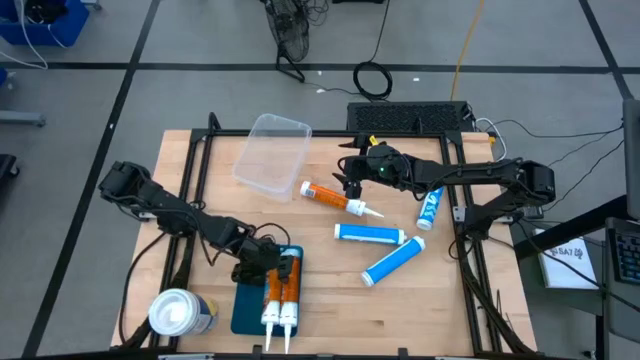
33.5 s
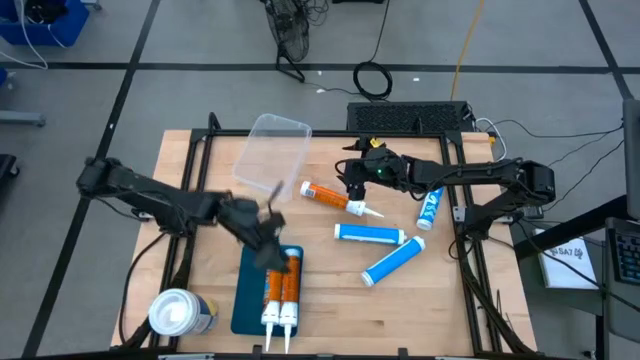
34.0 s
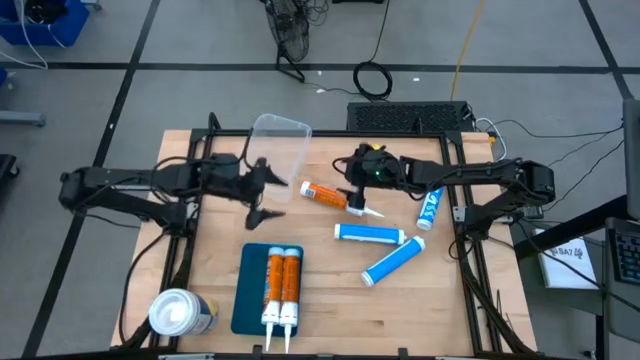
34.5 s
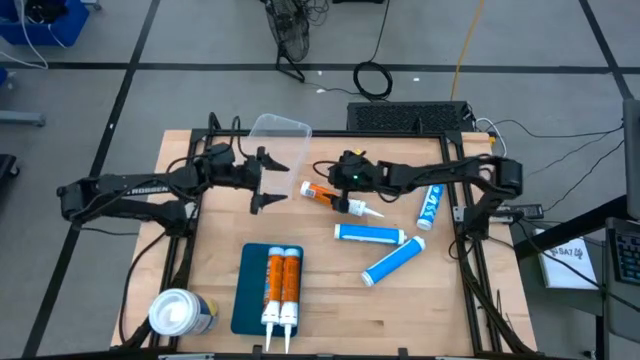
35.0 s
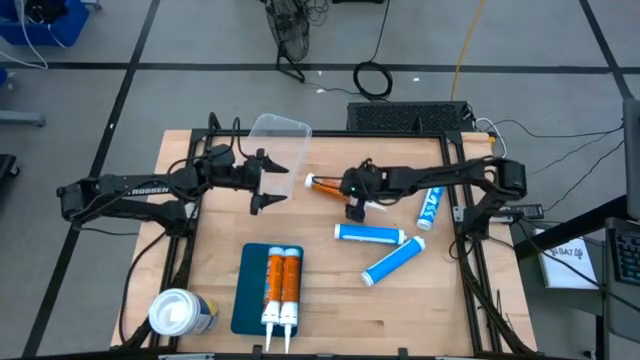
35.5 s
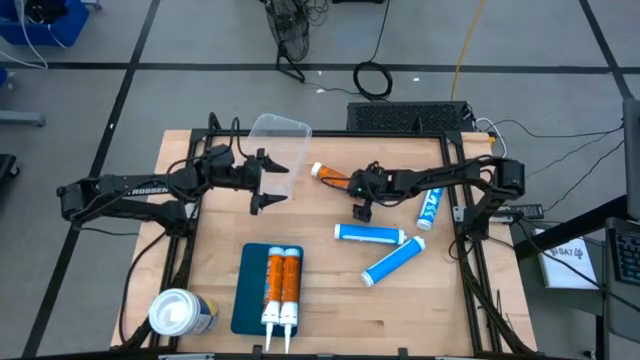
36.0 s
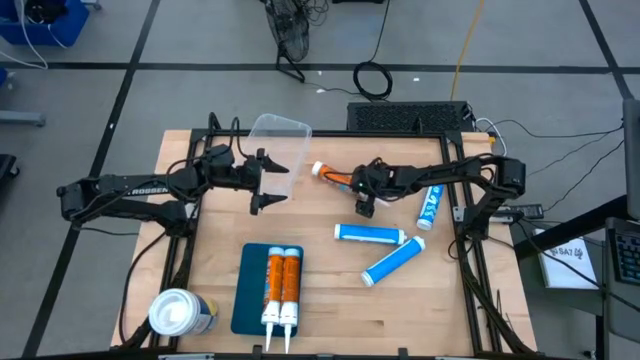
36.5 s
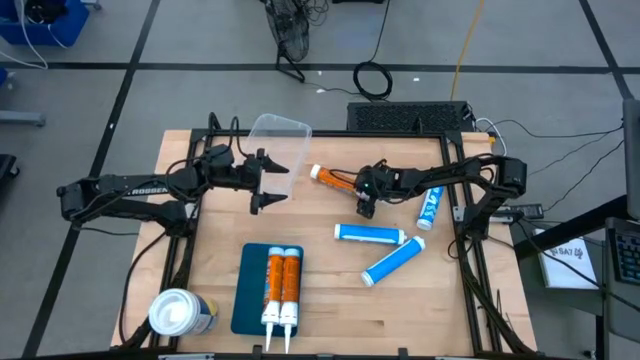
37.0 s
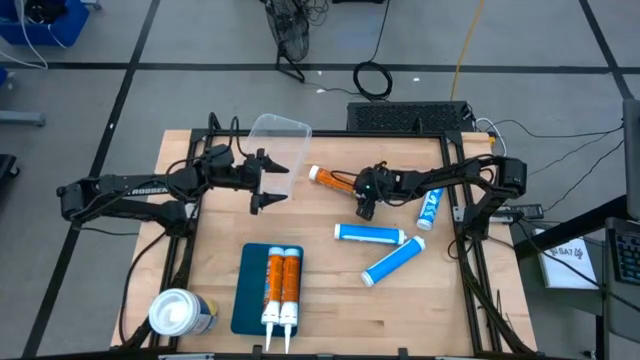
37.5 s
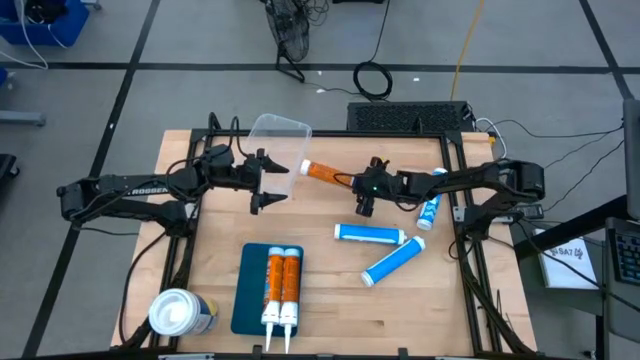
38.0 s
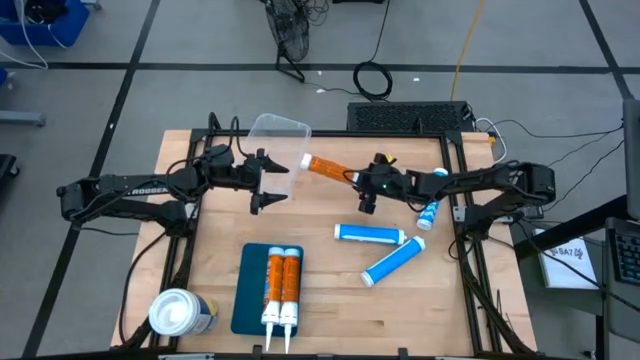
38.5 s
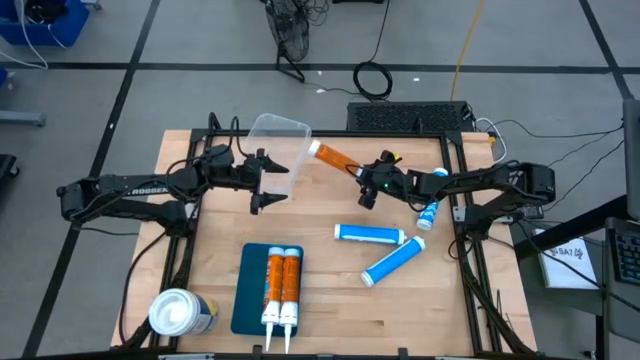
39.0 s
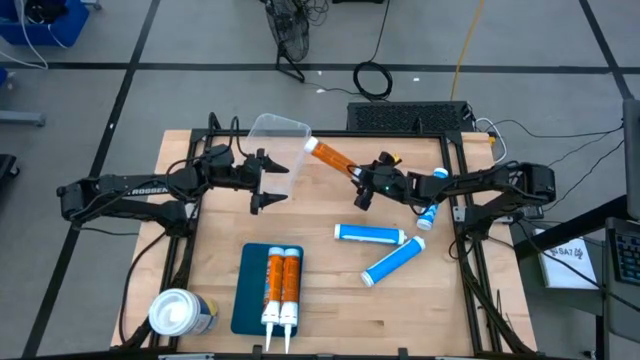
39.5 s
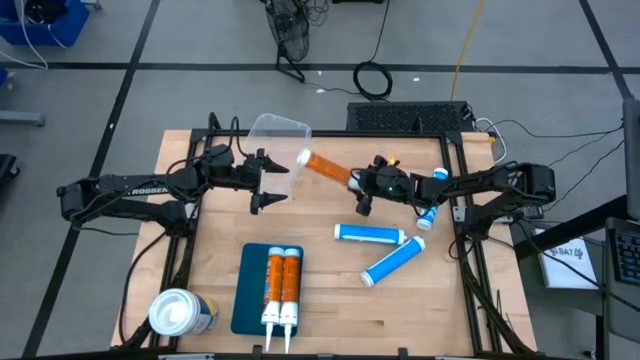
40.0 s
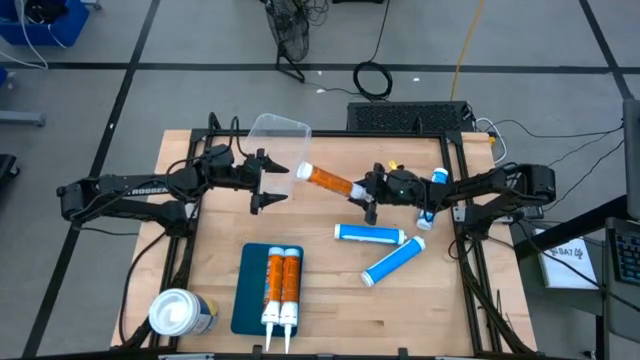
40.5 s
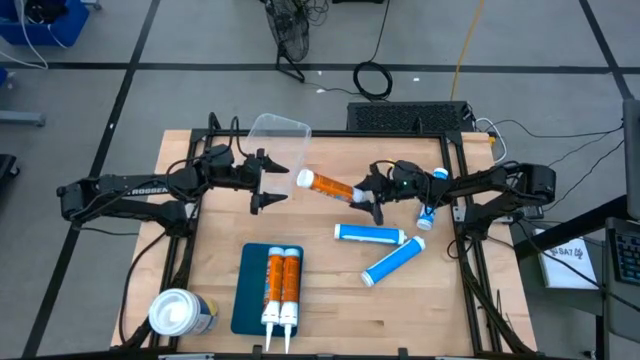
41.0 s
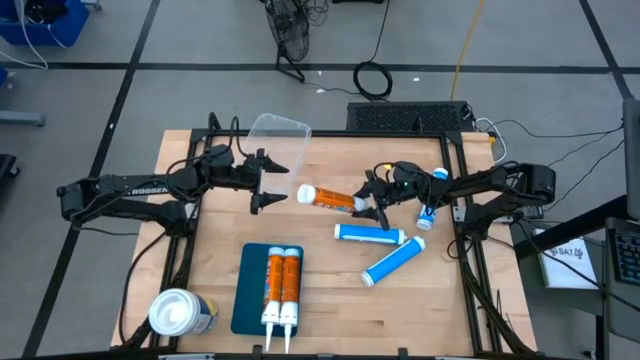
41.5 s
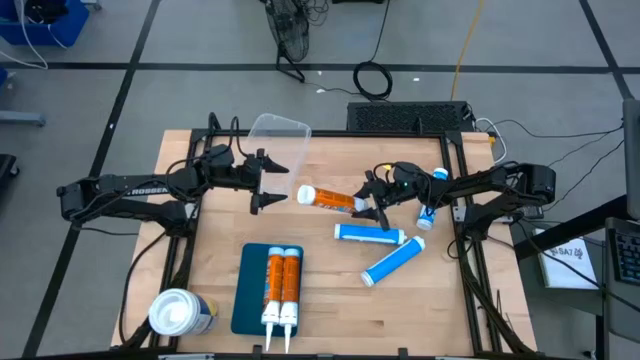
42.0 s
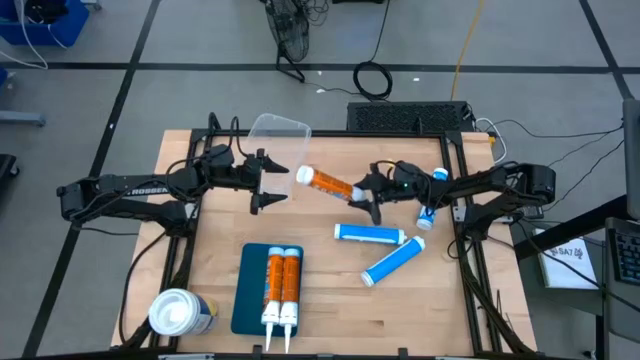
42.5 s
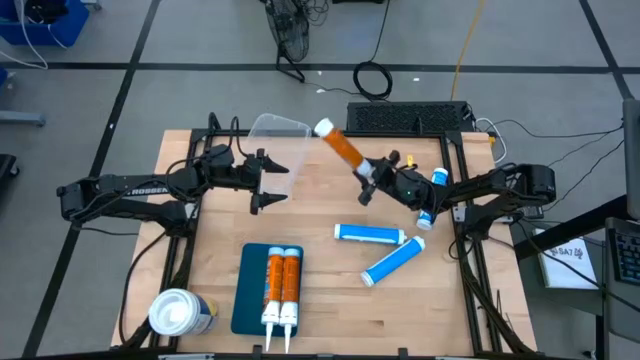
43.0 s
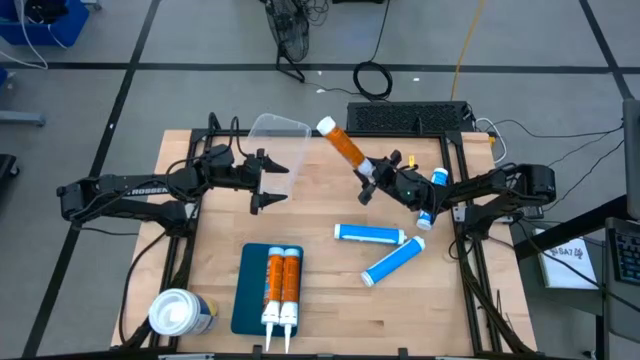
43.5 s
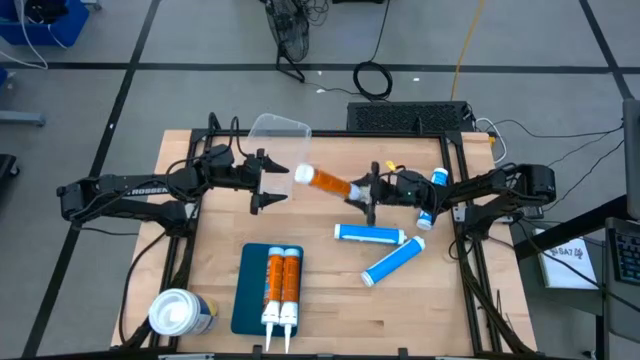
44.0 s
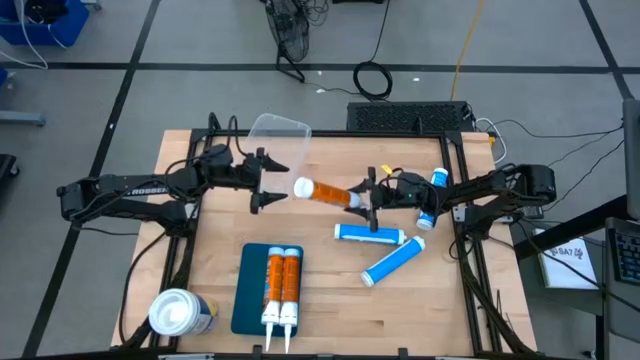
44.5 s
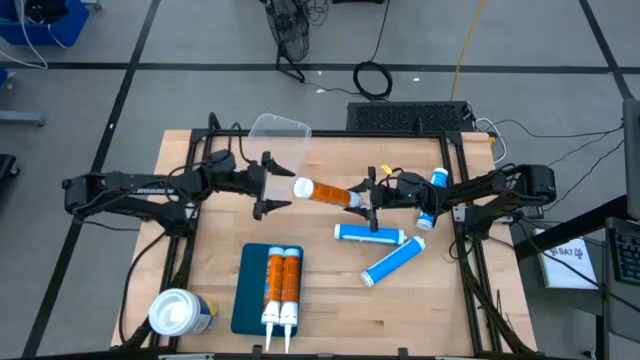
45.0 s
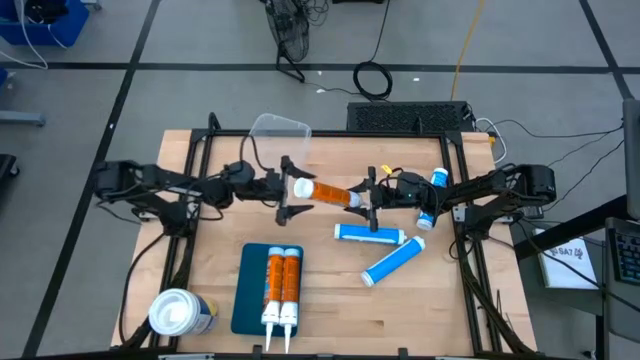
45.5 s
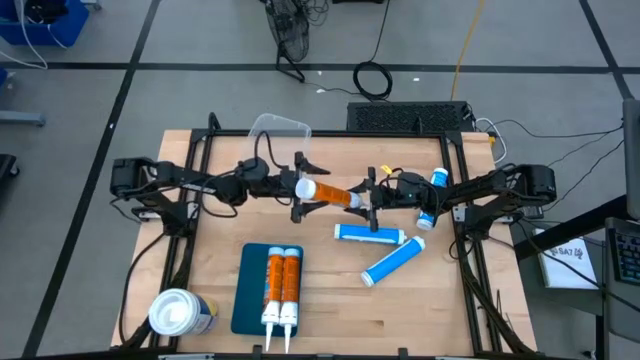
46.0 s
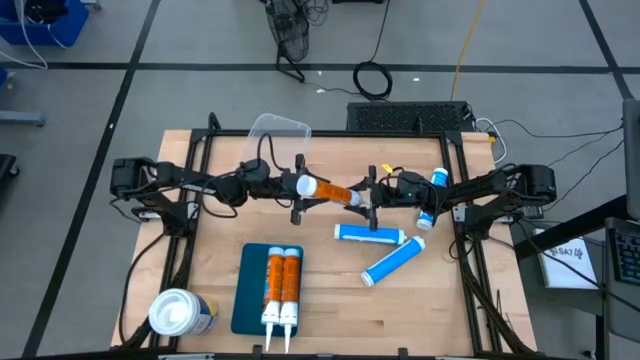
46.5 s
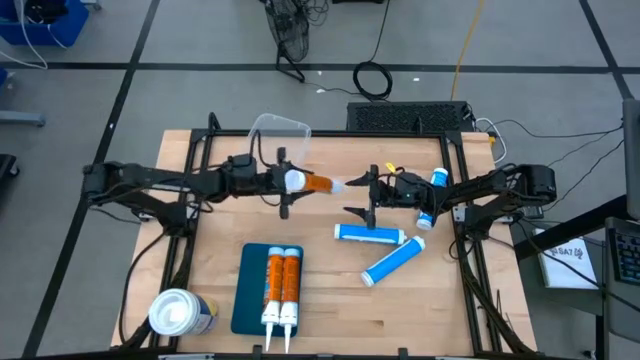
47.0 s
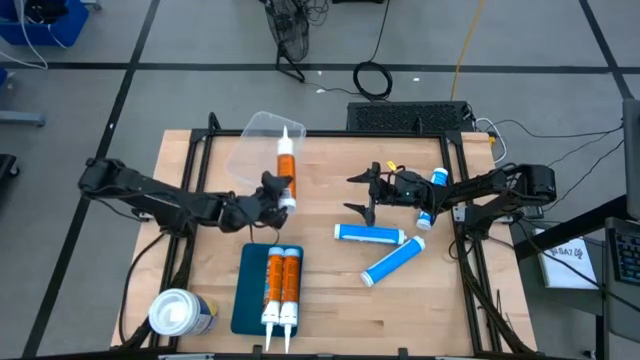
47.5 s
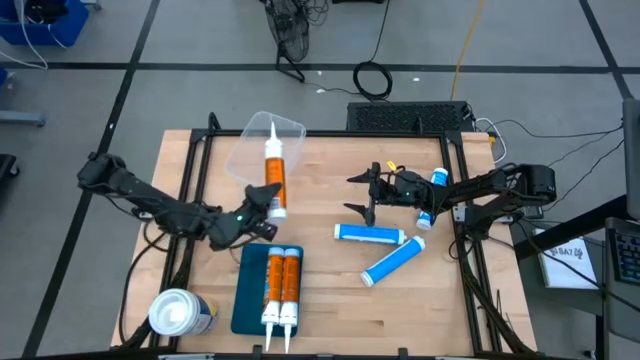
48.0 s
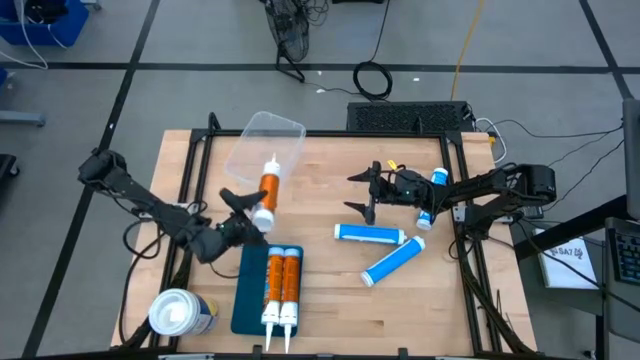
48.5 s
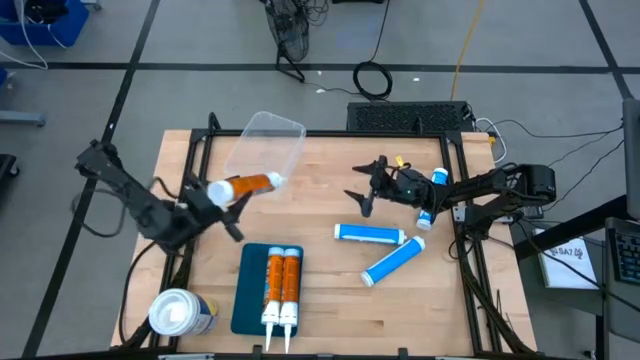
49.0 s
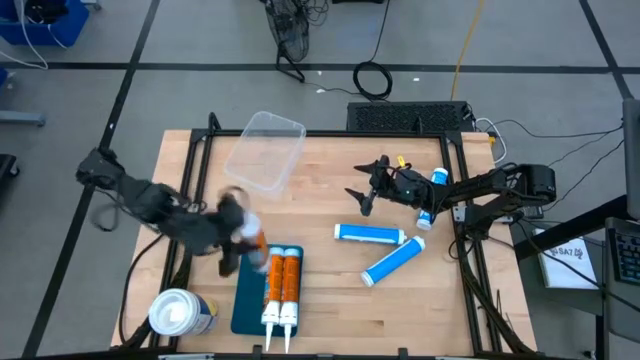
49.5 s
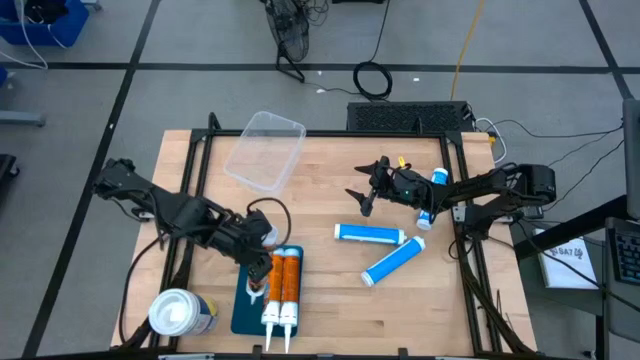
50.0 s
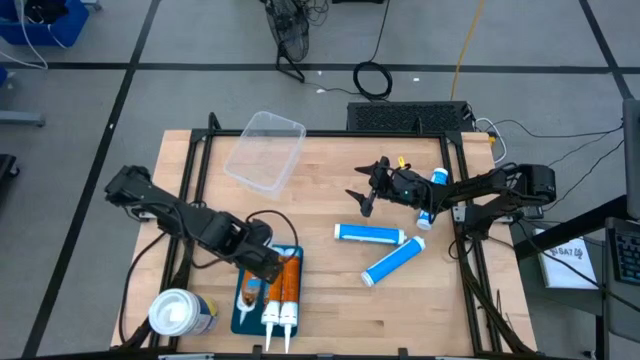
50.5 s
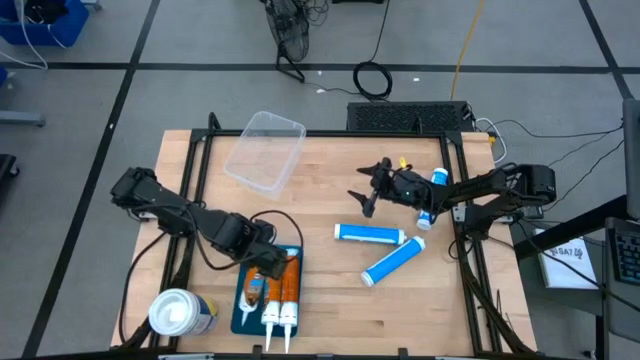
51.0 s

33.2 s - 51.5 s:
Task: Pick & place silicon tubes, Sealant and Lysol wipes
Put the orange sealant into the blue bin

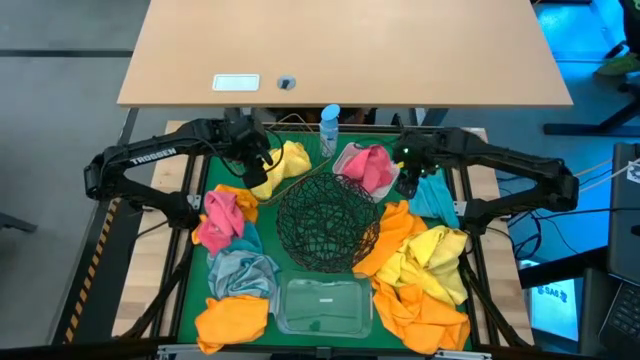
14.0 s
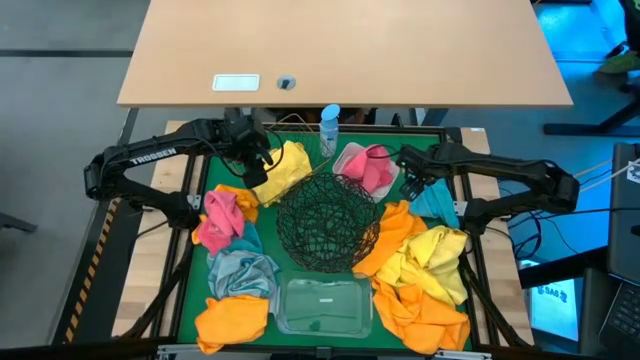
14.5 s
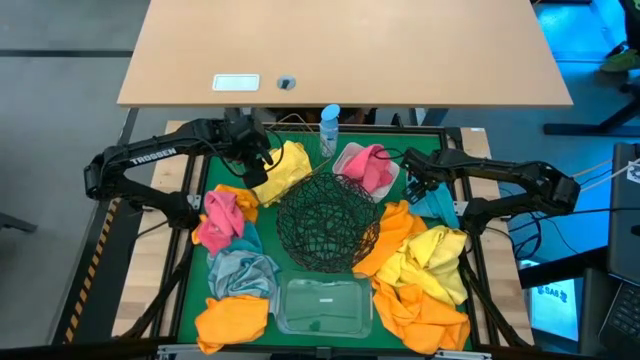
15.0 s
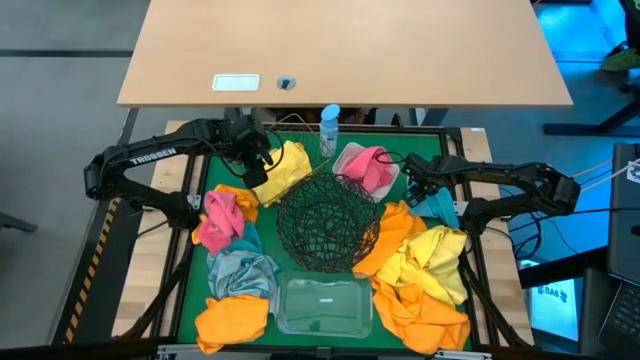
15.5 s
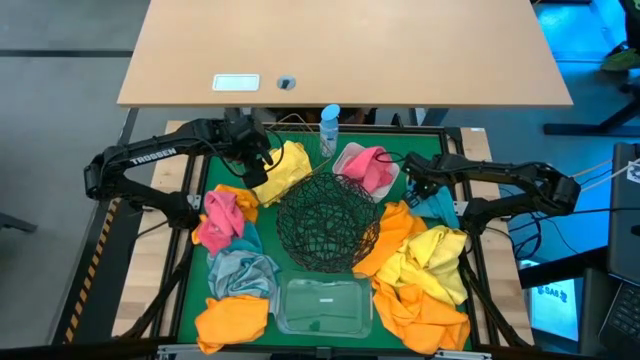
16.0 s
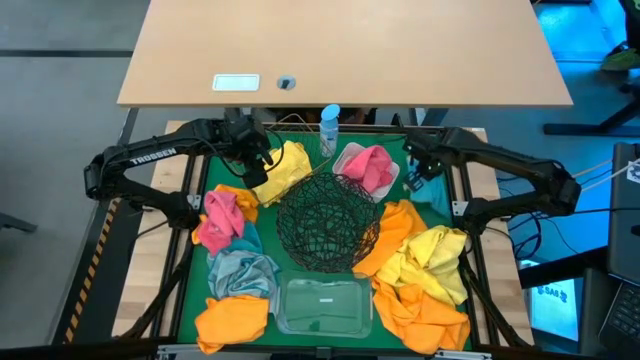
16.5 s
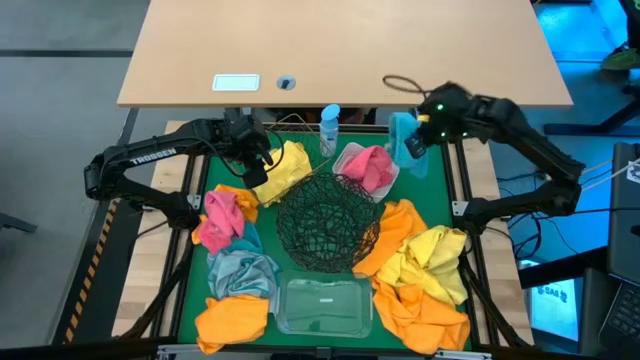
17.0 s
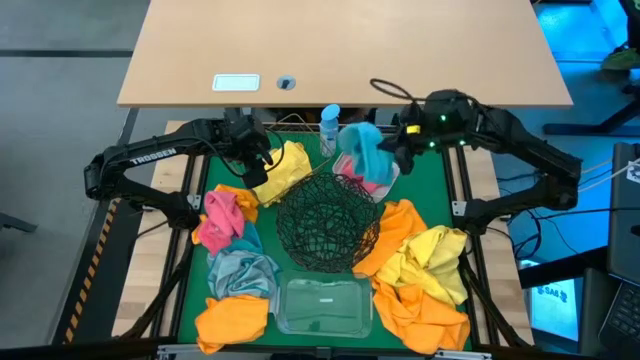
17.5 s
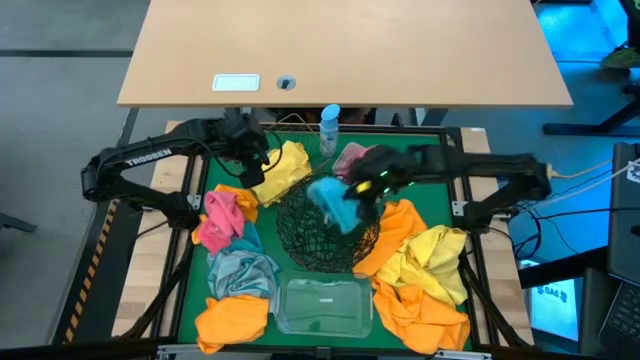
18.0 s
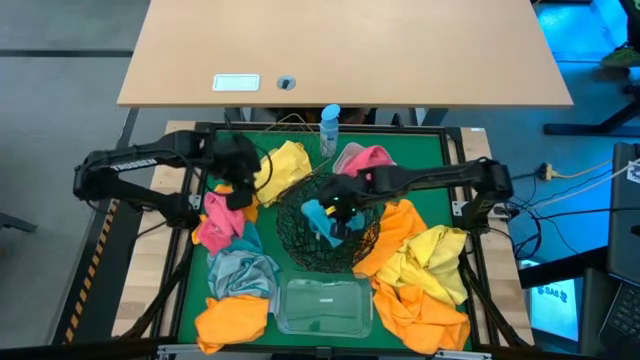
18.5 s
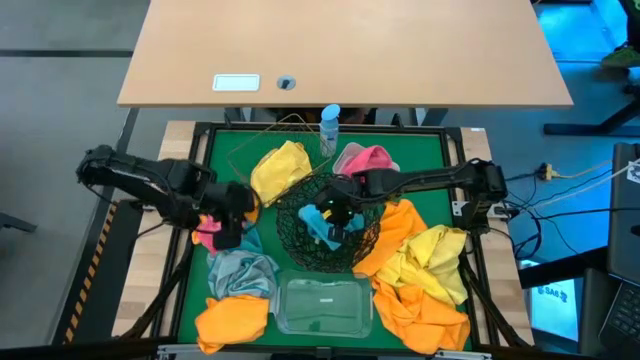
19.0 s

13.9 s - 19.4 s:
Task: Sort microfiber towel by color & place in baskets
Put the blue microfiber towel into the black wire basket
